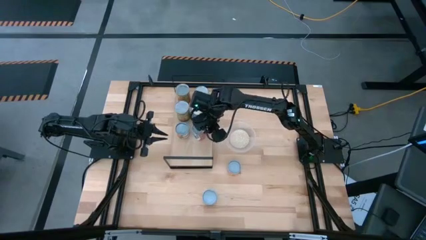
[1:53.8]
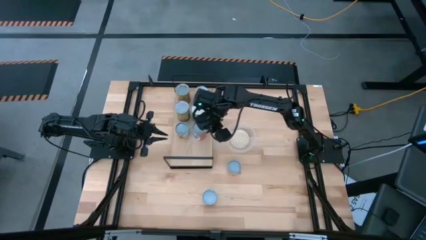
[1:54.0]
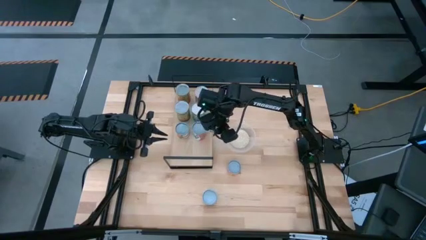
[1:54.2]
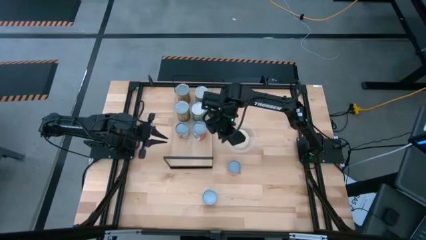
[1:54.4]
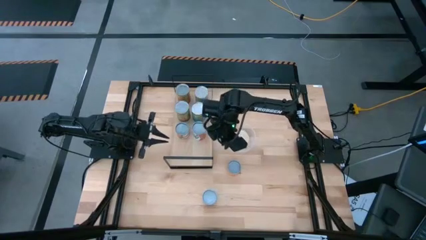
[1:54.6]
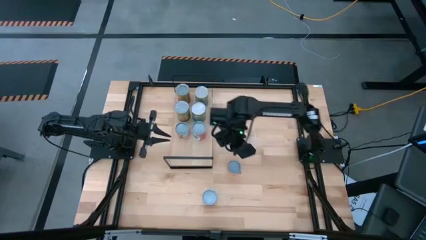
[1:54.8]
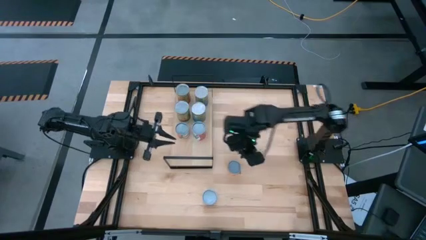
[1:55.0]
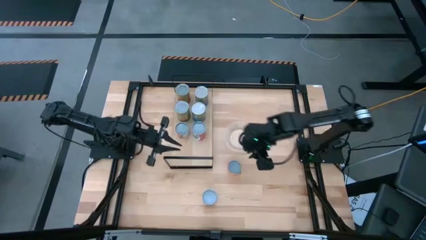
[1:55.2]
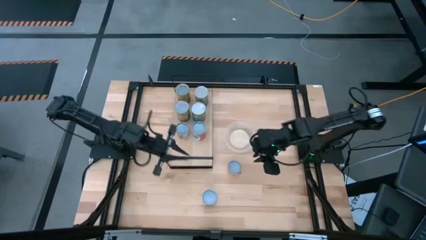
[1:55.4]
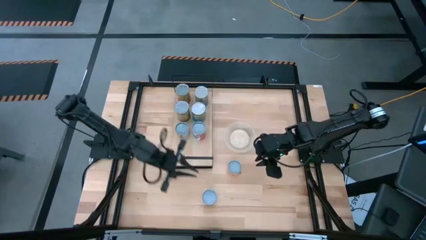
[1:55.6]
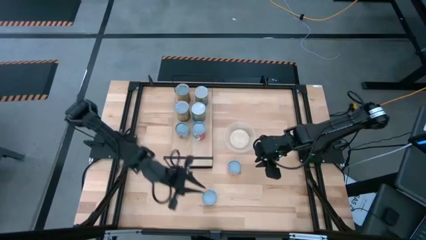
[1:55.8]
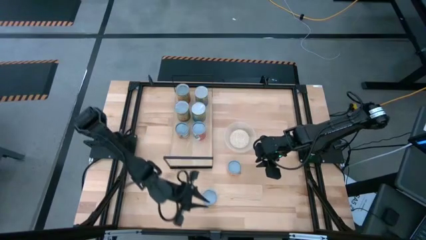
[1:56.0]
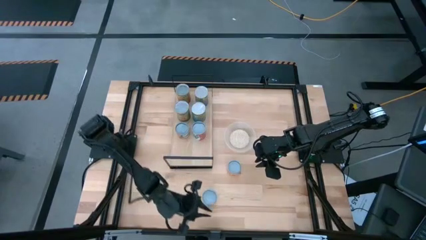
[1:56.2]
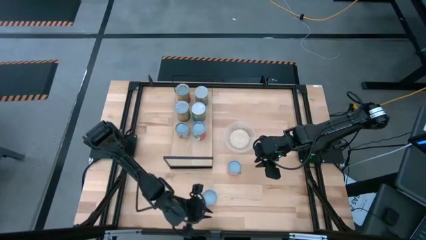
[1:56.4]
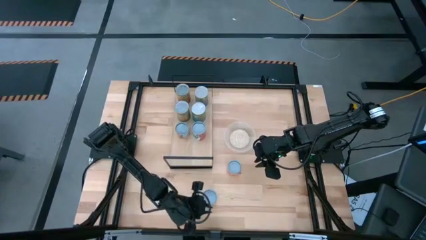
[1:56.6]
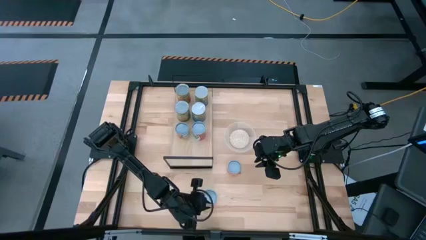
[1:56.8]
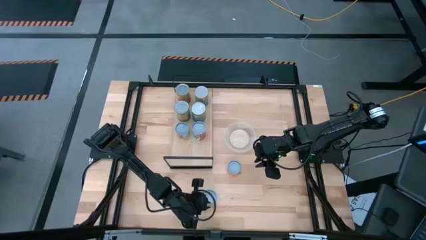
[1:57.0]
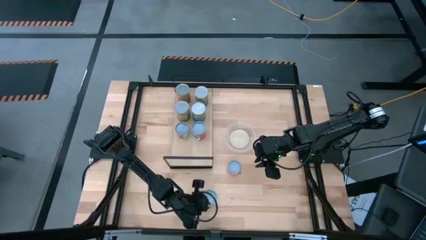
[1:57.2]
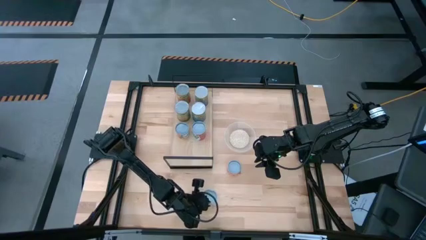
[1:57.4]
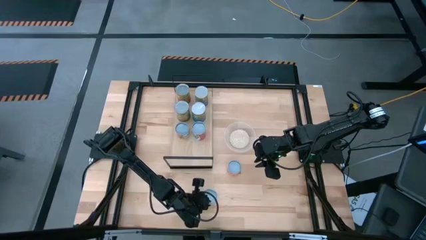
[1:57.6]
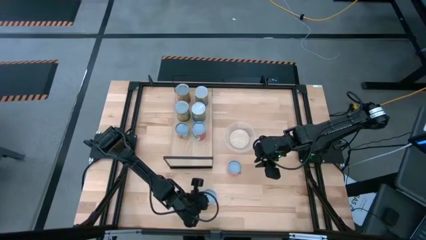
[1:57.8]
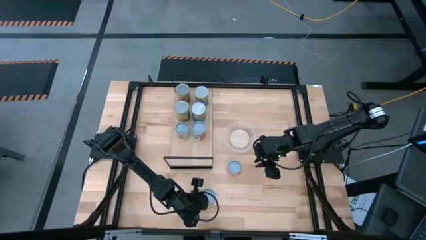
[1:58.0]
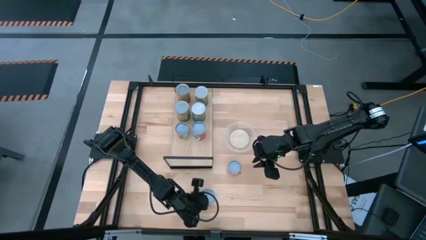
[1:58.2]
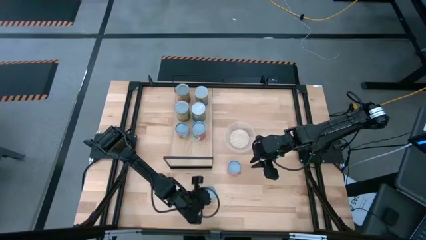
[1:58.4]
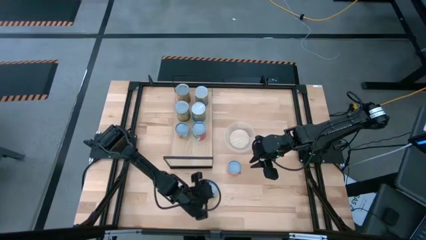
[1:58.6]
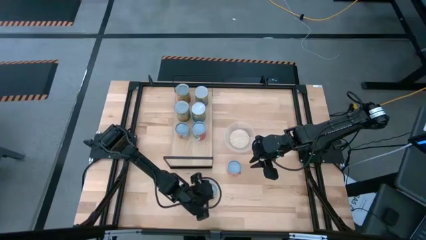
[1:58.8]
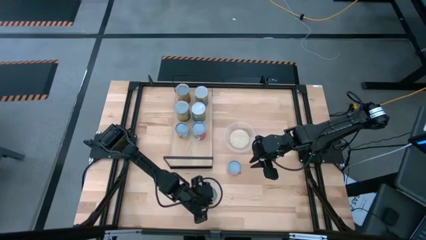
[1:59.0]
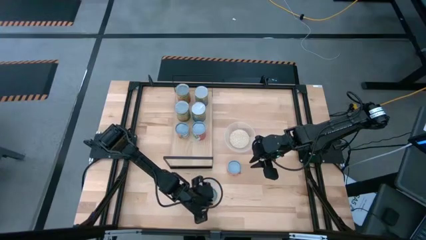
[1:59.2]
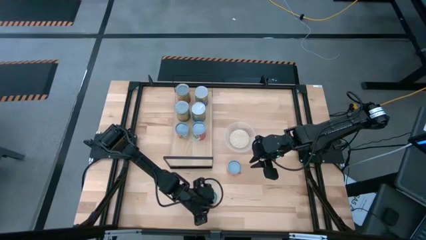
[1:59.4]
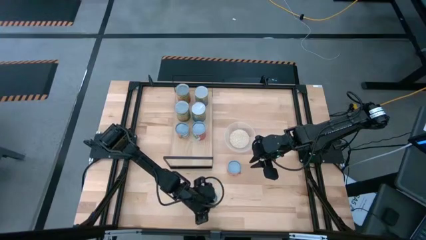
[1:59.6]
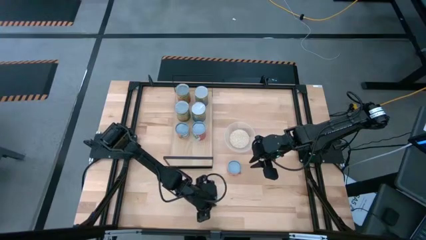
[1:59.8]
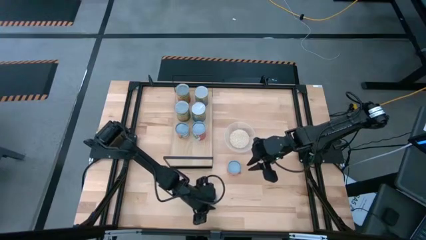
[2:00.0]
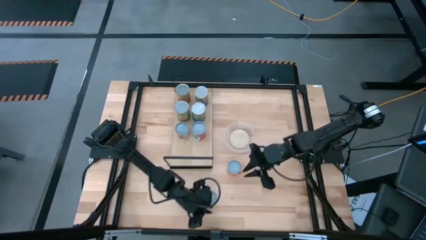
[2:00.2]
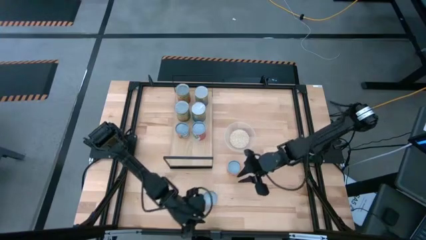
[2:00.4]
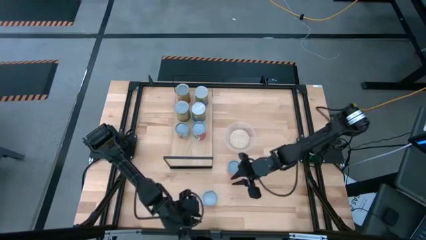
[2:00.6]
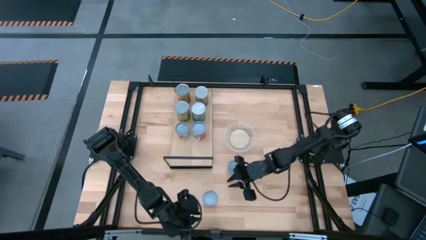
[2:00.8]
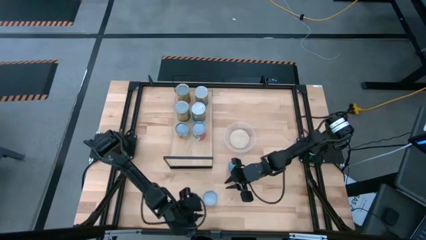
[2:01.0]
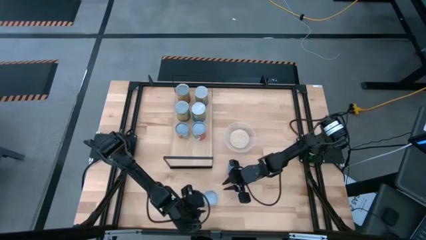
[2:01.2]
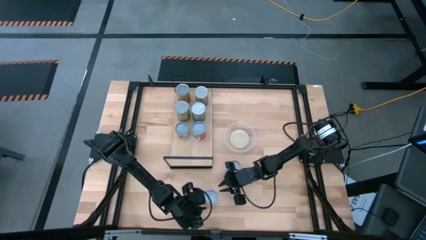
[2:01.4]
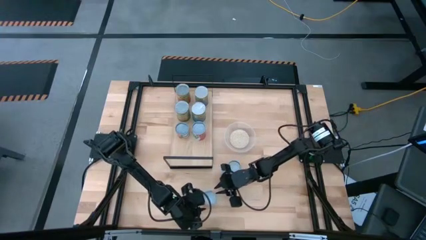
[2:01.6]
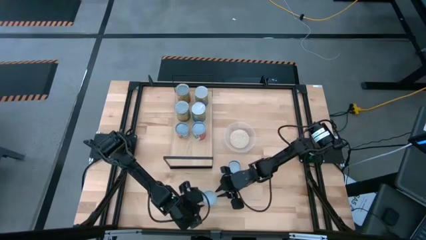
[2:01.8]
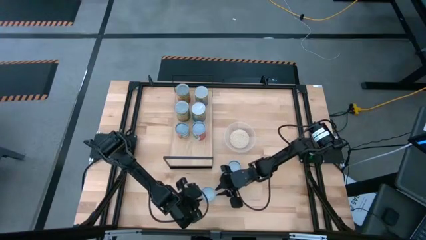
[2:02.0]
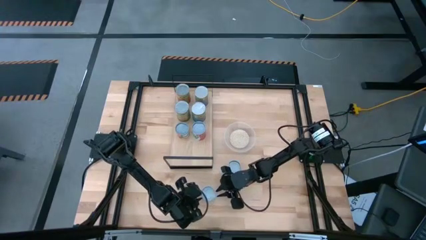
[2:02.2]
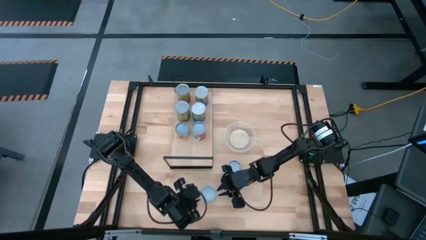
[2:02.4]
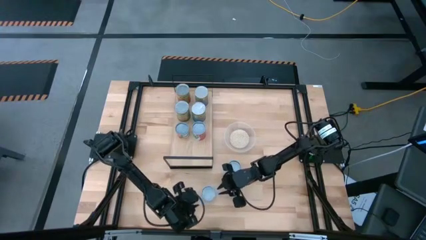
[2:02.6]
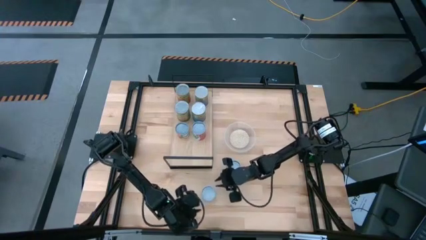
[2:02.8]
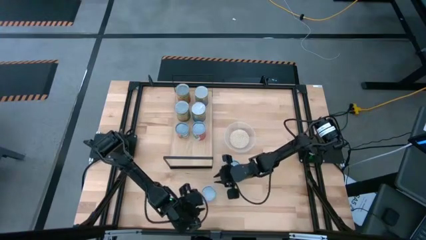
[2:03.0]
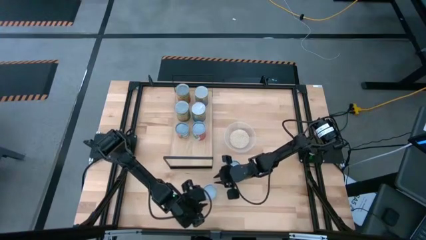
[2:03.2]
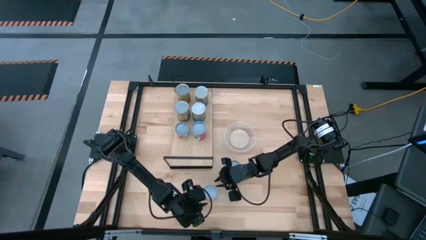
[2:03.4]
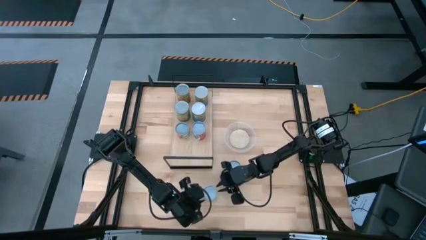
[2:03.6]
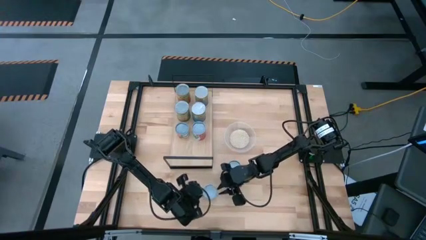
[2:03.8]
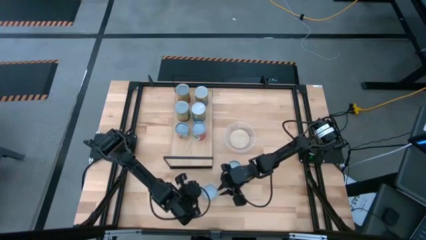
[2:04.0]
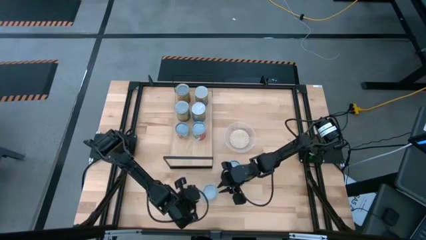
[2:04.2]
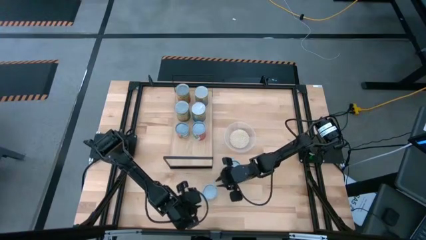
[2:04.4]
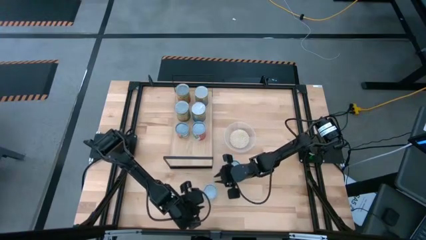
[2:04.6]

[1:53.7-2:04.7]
Task: Pick and place cans onto a shelf
Put the small canned peaches on the shelf
